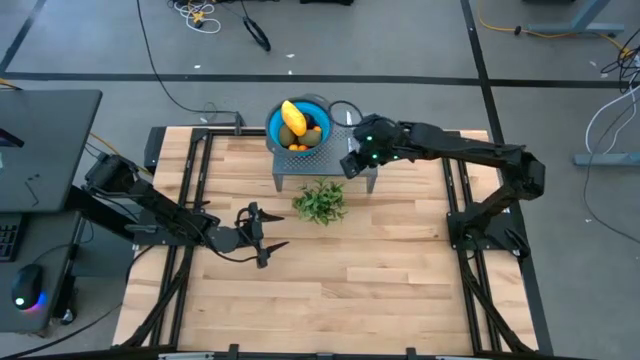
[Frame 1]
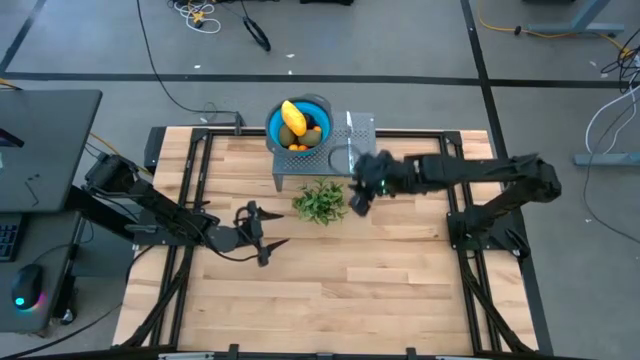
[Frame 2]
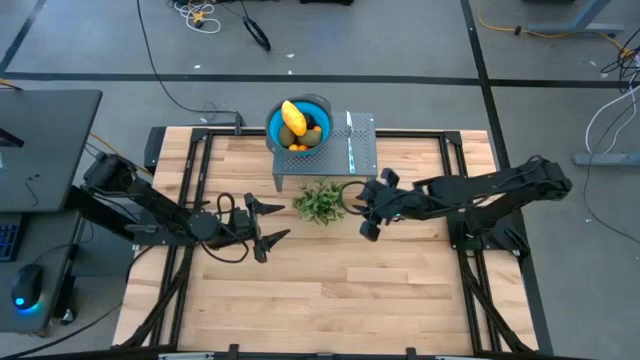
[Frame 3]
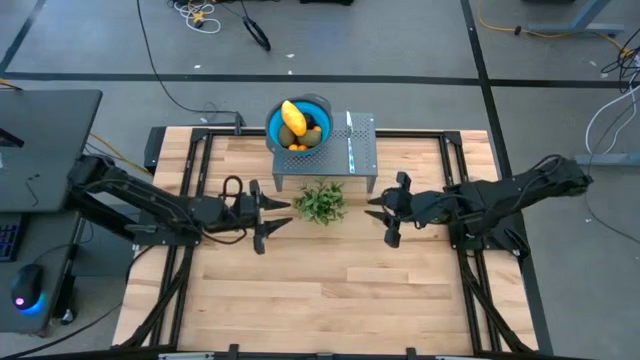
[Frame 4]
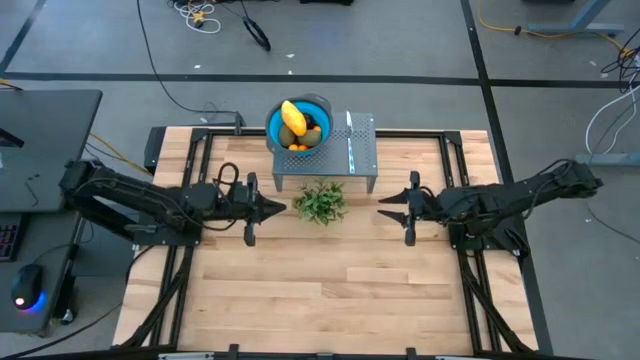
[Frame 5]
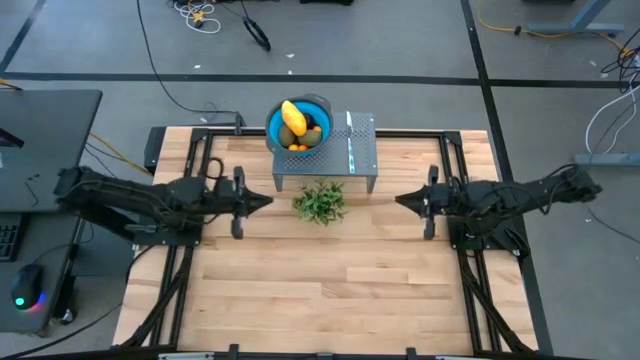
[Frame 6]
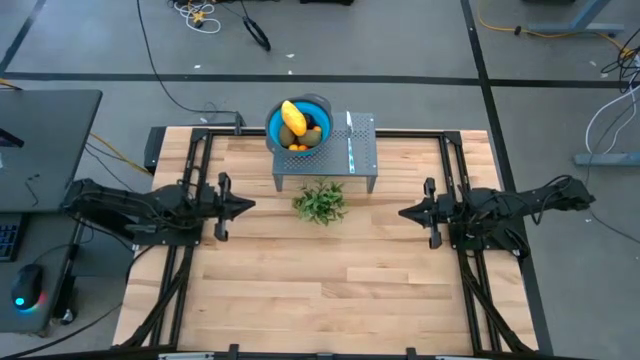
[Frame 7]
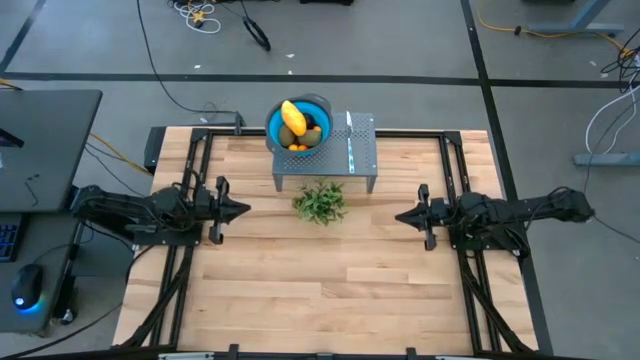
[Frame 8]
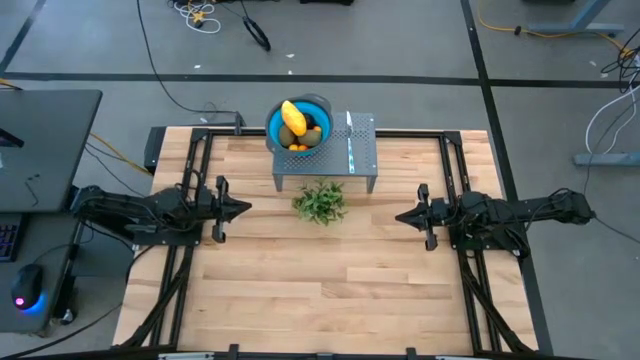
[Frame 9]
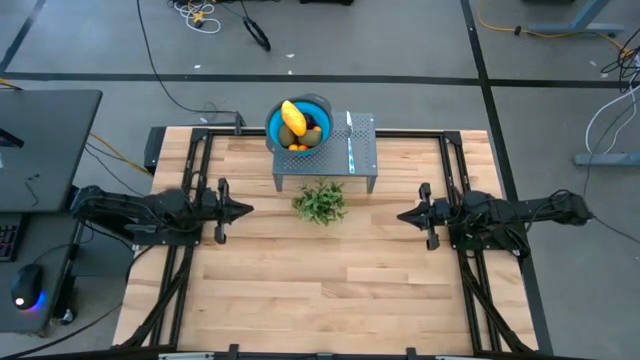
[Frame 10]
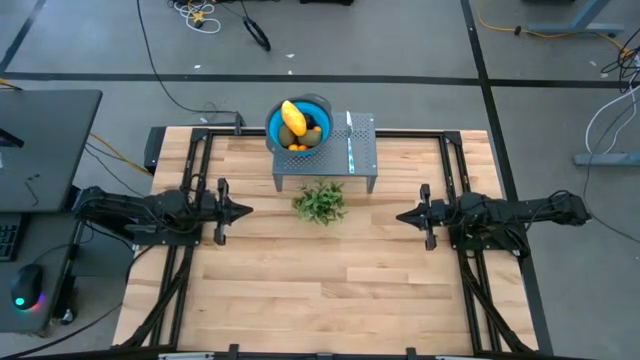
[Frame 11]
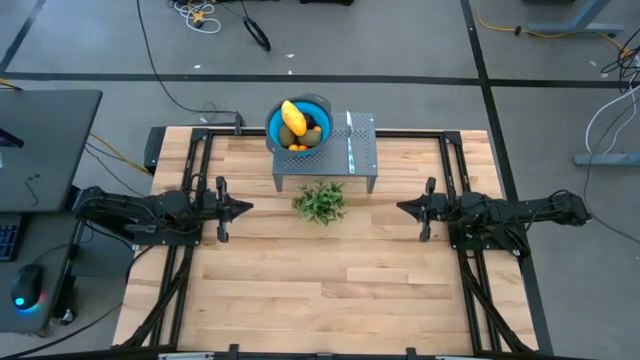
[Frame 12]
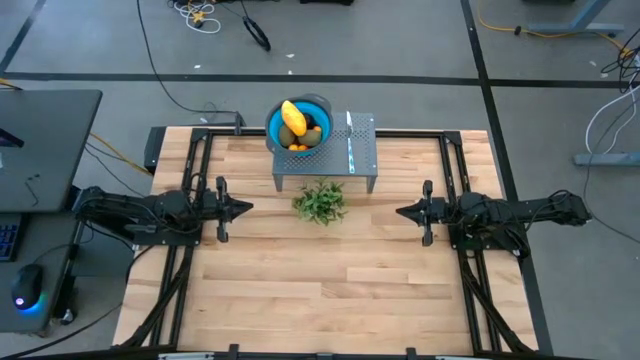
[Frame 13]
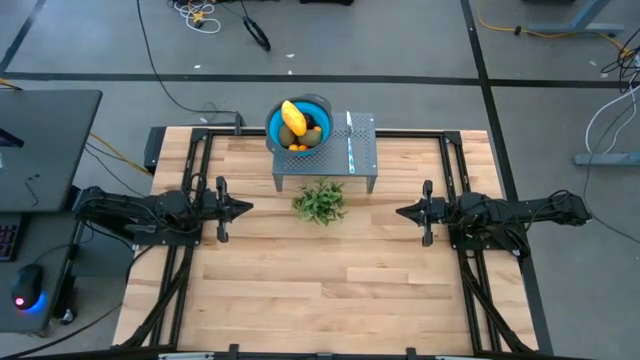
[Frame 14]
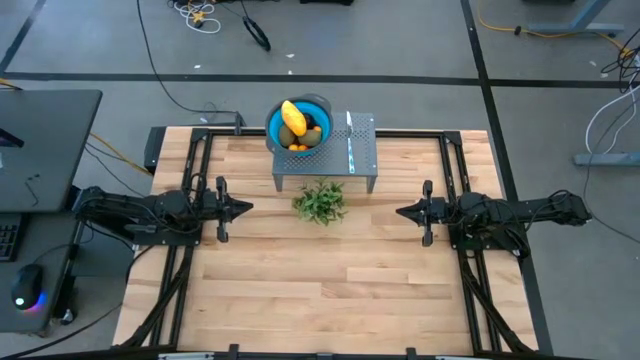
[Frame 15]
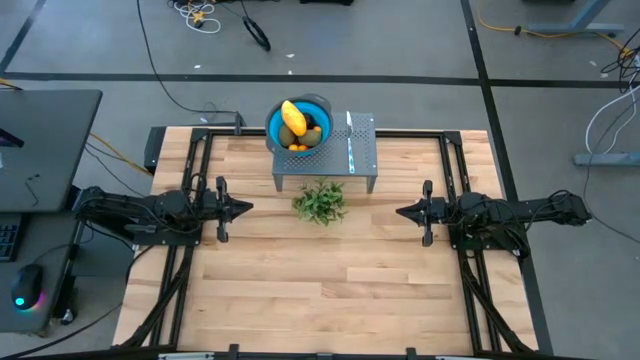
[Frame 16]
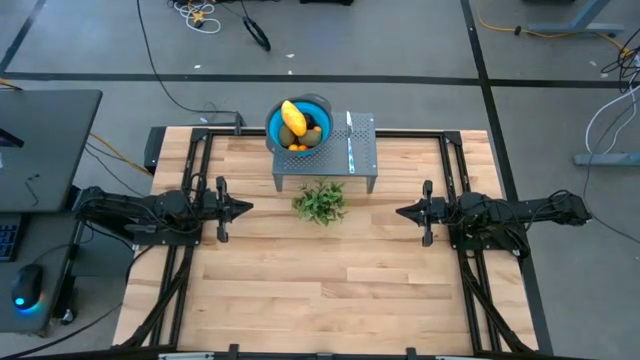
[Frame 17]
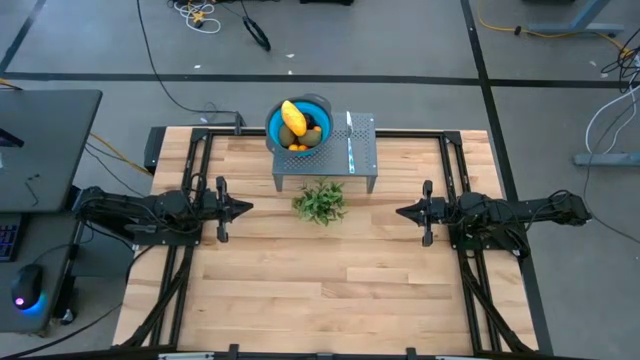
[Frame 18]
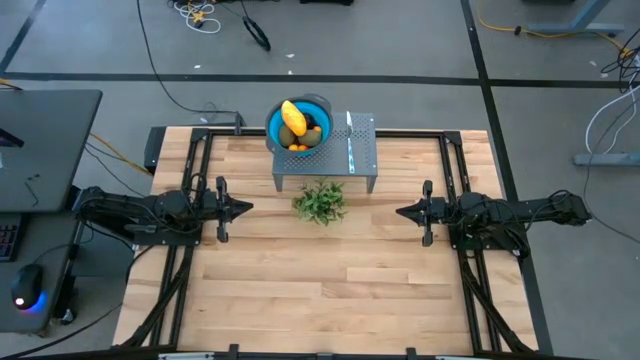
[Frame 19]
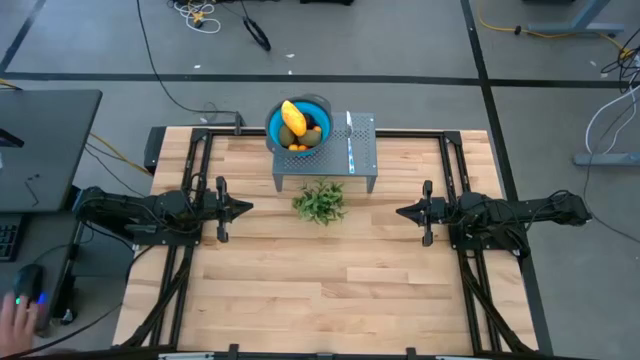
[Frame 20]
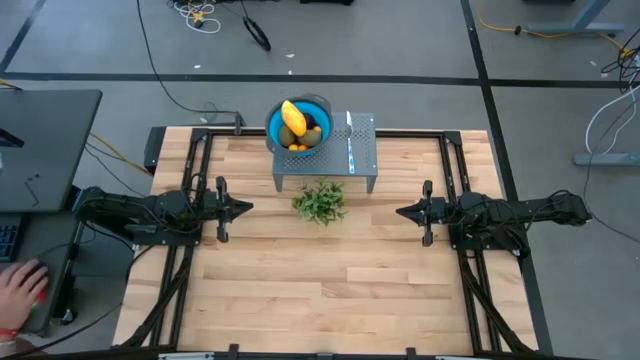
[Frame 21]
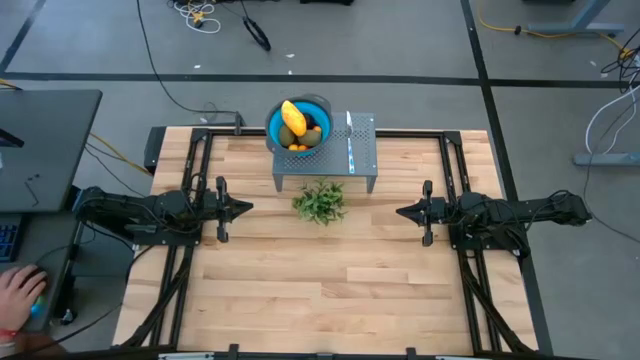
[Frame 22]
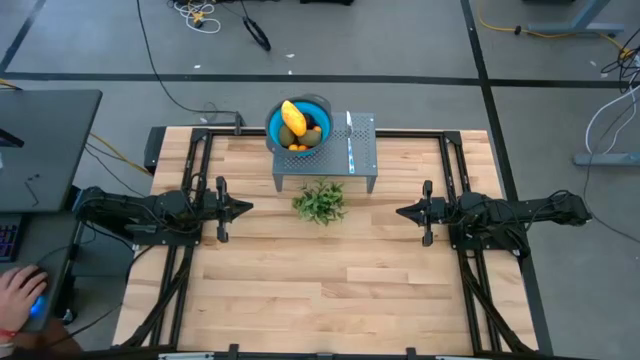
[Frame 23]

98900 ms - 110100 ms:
Task: Pick & Place Fruit
Return to Home Position

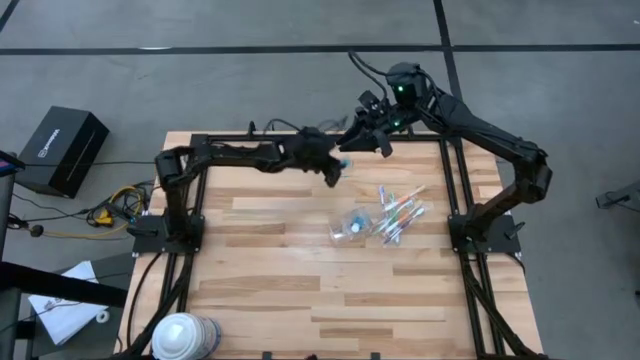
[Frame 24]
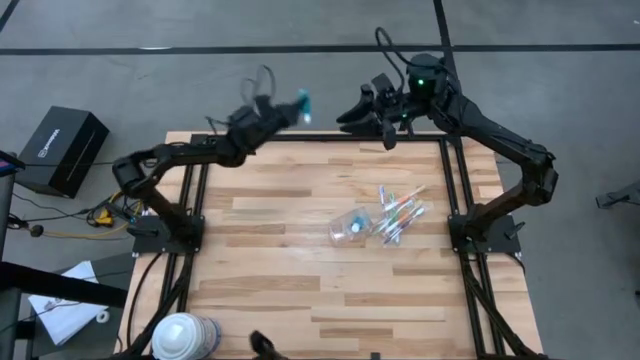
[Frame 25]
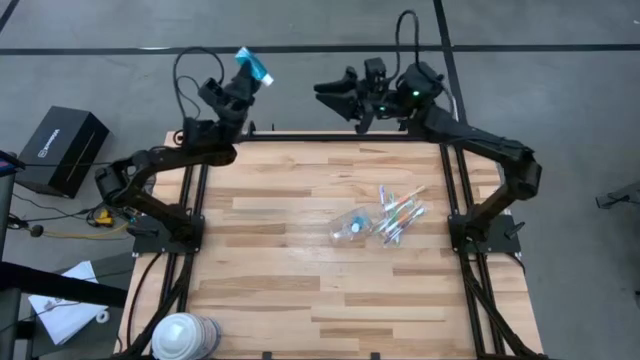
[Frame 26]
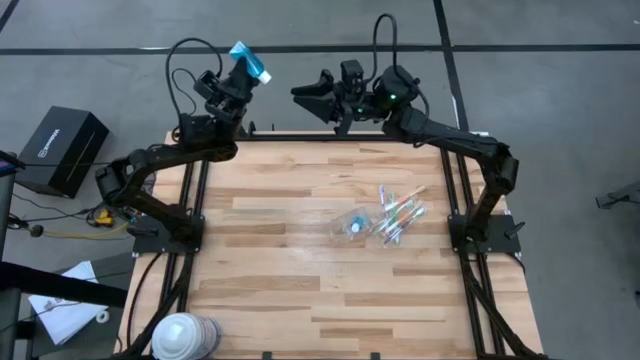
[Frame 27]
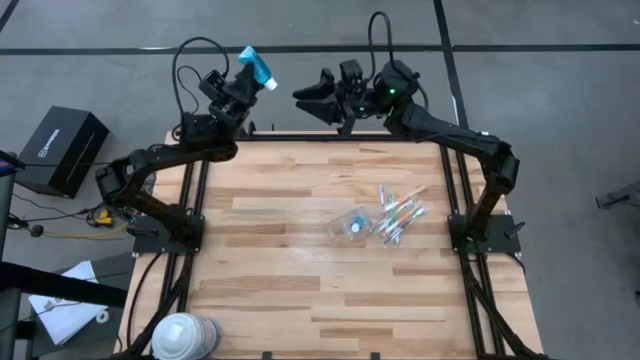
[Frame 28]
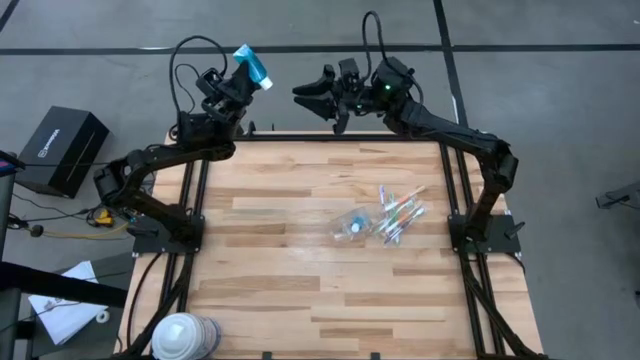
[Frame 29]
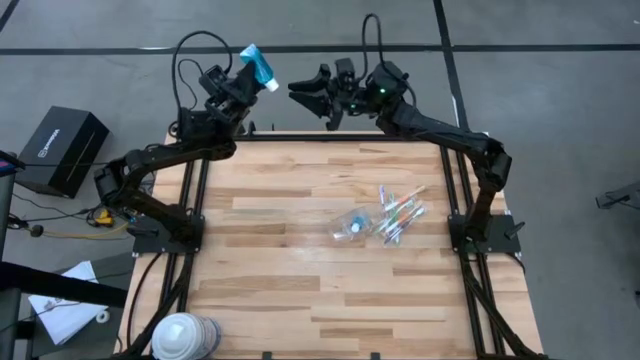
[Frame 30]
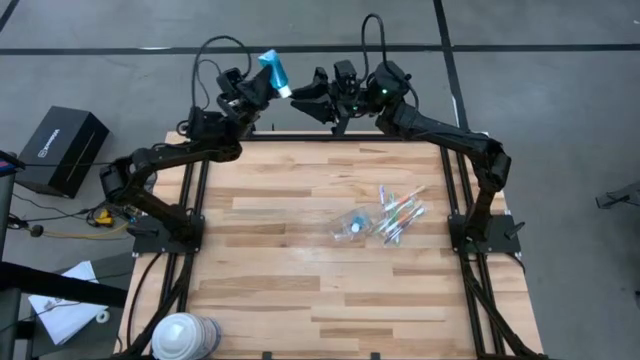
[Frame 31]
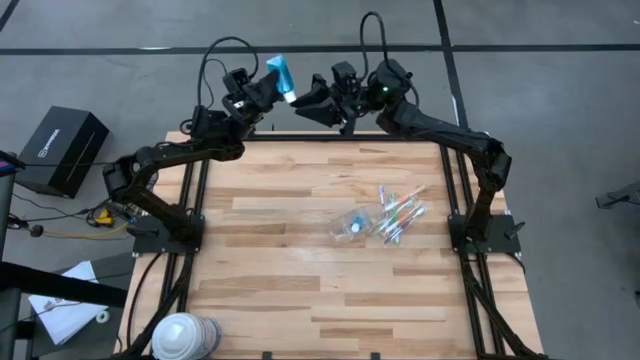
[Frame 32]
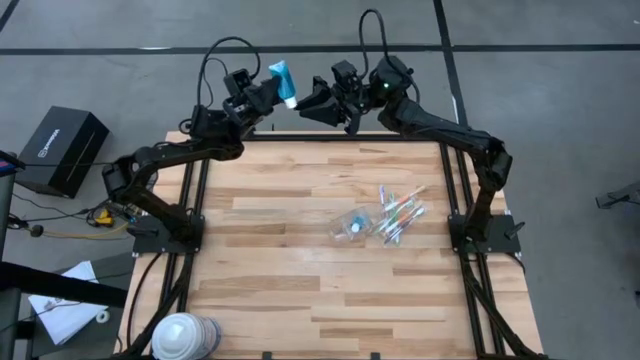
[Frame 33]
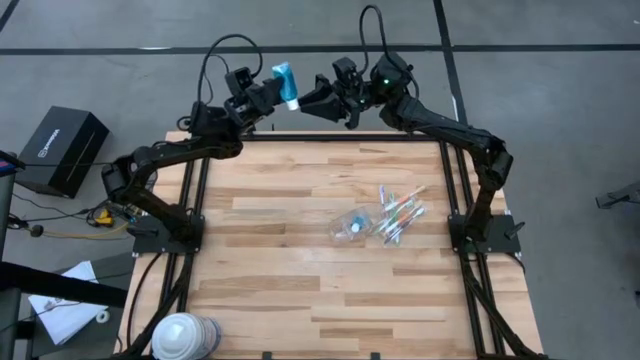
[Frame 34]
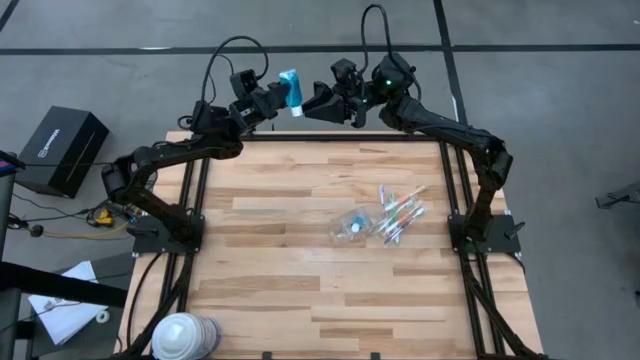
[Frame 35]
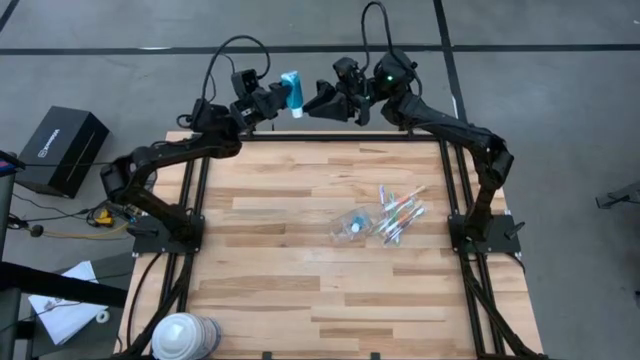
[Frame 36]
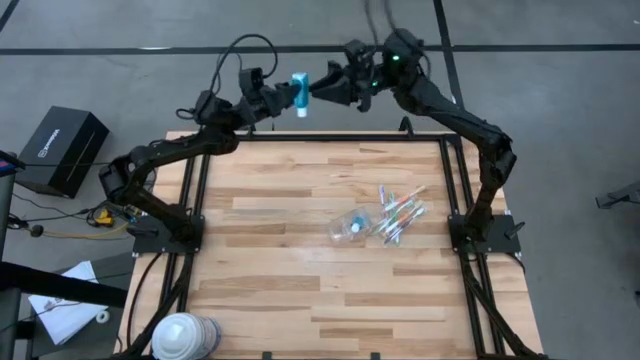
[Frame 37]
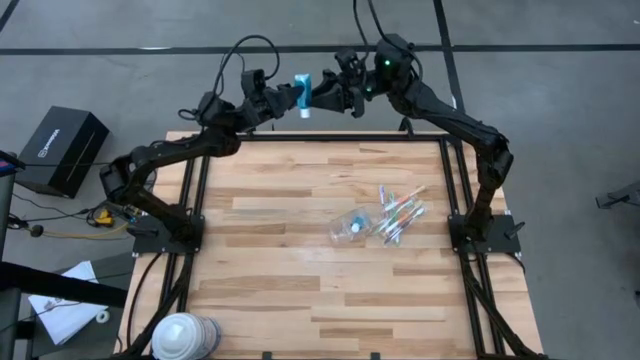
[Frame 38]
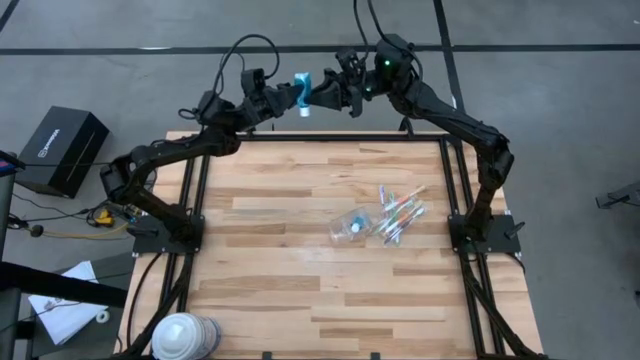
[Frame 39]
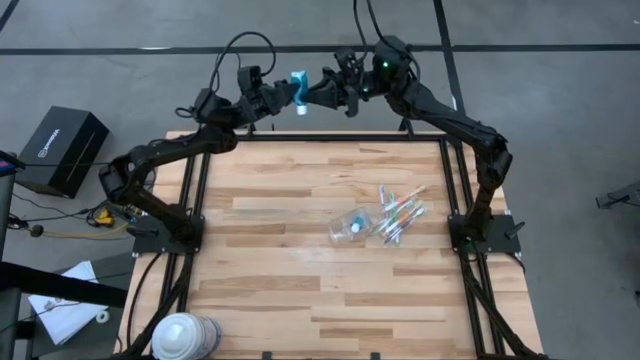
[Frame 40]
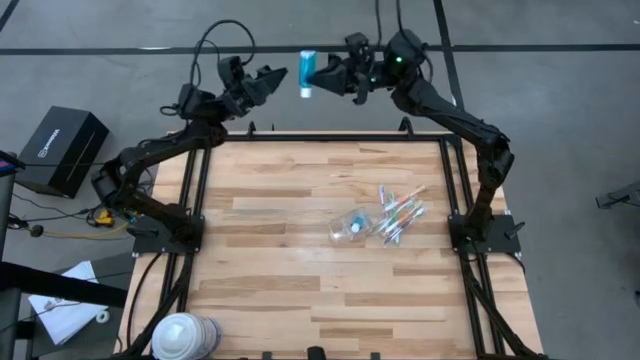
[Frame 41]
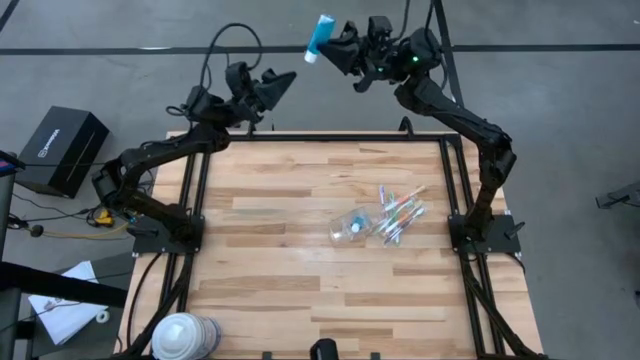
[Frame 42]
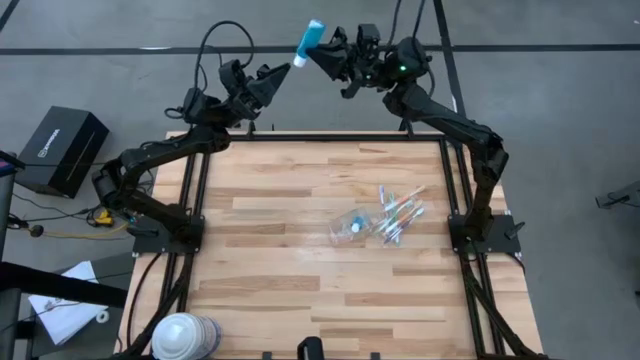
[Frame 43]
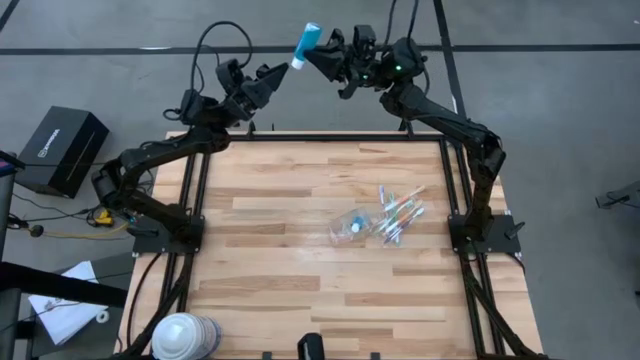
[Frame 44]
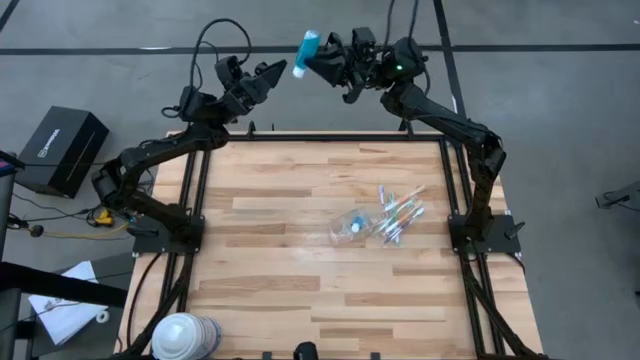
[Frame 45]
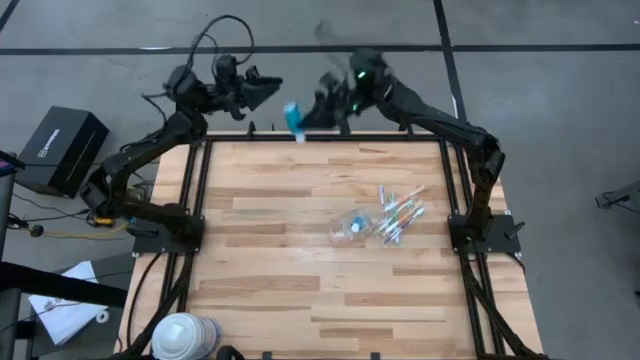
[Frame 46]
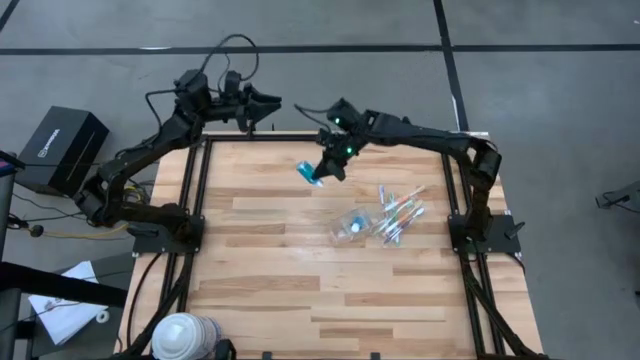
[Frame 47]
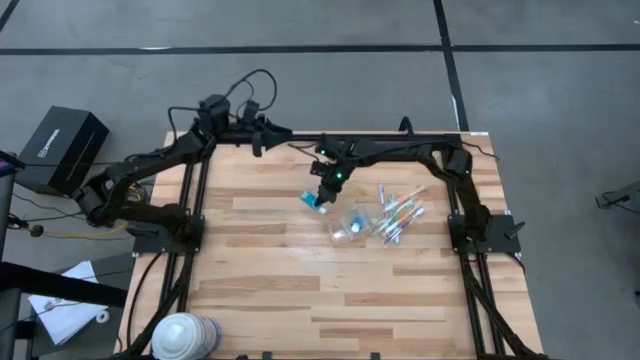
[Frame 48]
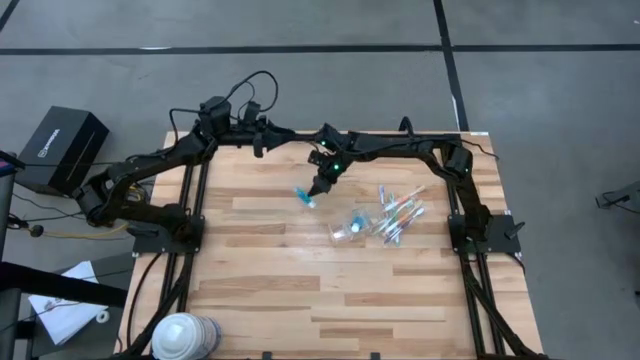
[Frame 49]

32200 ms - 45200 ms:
Task: Pick & Place toothbrushing station
Put the blue mouthwash into the transparent organizer
